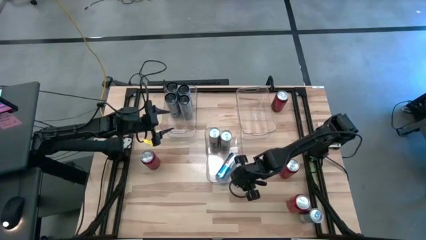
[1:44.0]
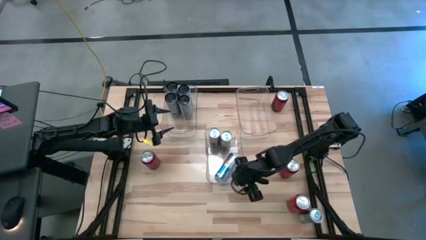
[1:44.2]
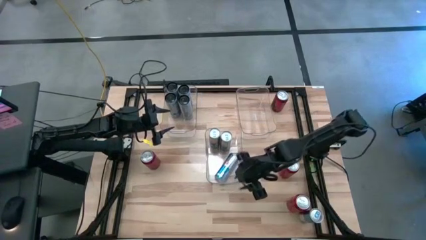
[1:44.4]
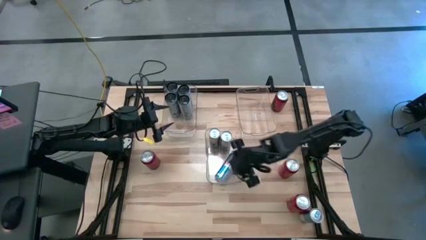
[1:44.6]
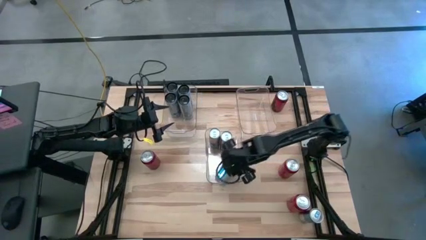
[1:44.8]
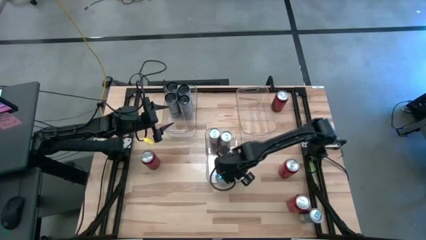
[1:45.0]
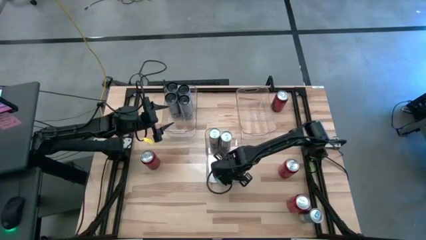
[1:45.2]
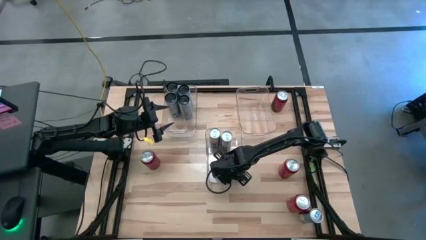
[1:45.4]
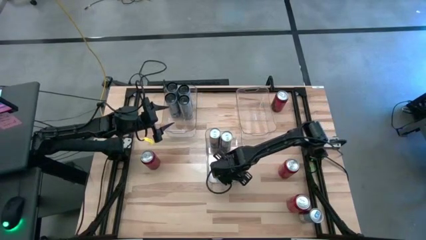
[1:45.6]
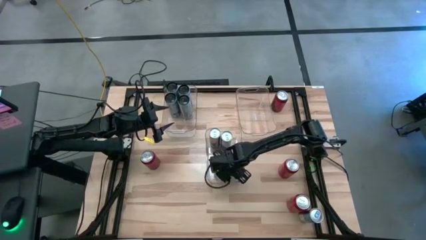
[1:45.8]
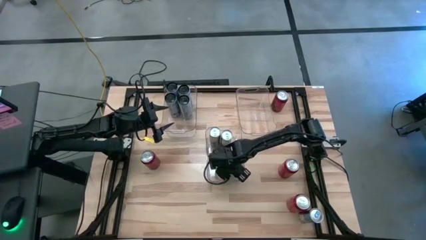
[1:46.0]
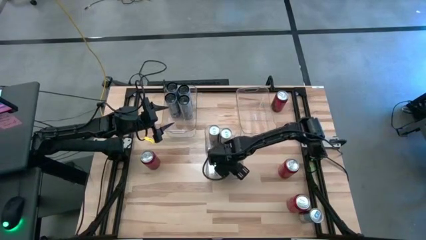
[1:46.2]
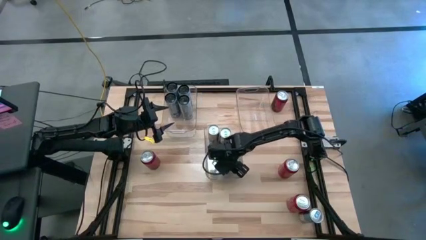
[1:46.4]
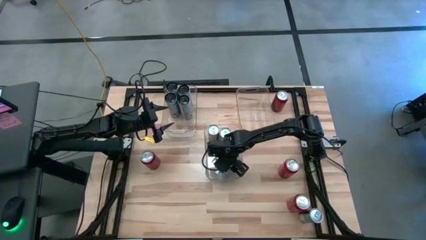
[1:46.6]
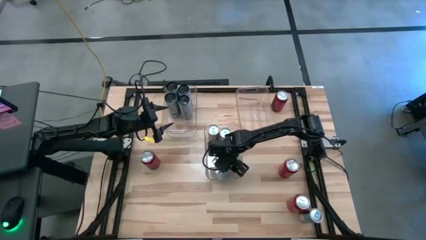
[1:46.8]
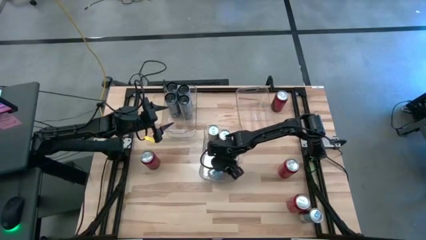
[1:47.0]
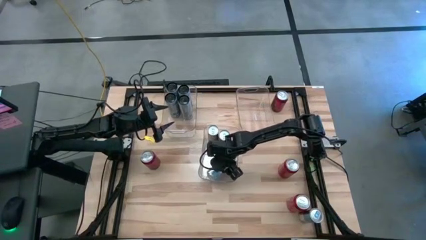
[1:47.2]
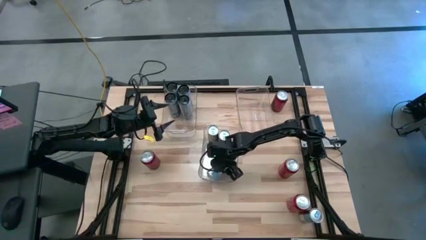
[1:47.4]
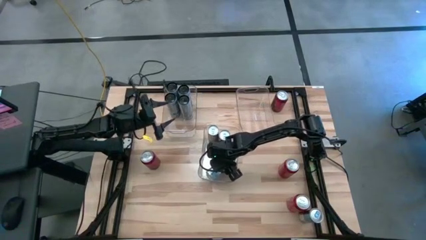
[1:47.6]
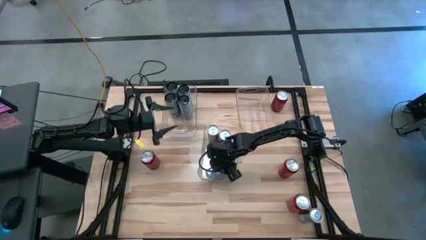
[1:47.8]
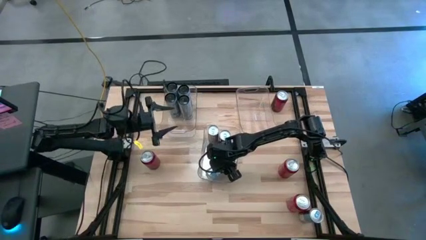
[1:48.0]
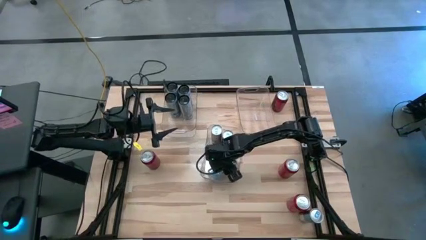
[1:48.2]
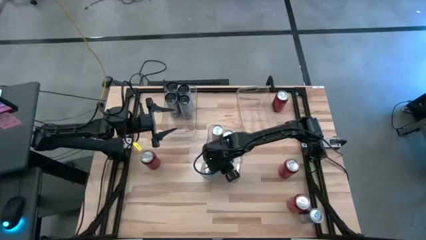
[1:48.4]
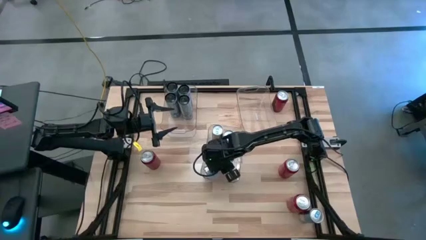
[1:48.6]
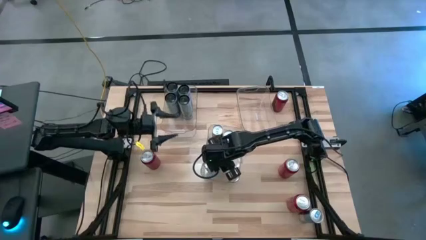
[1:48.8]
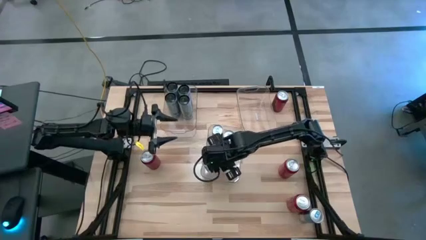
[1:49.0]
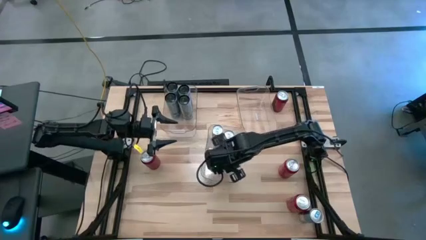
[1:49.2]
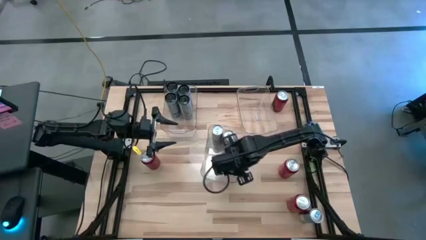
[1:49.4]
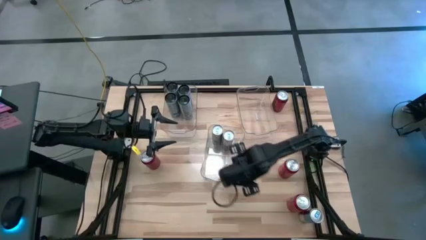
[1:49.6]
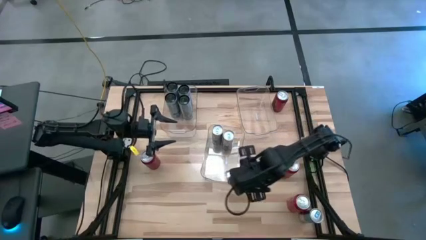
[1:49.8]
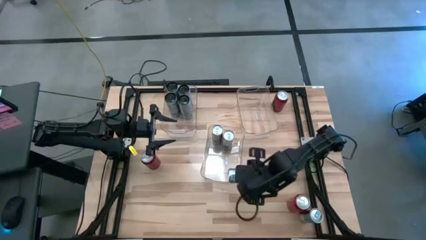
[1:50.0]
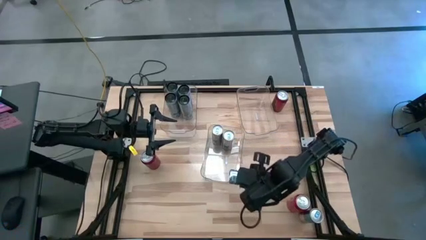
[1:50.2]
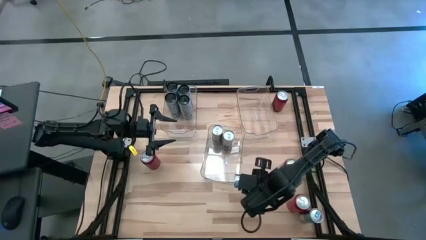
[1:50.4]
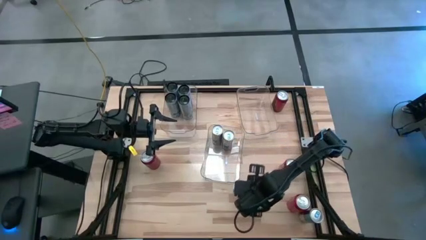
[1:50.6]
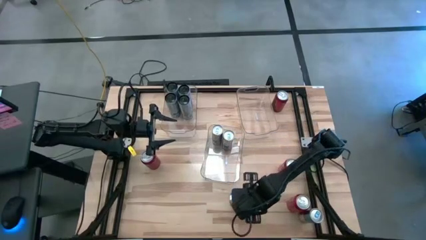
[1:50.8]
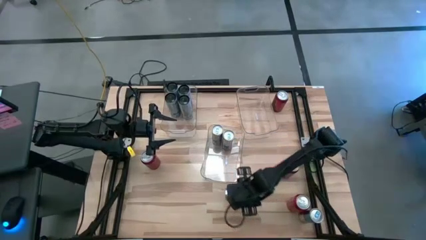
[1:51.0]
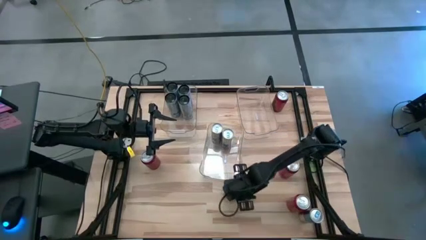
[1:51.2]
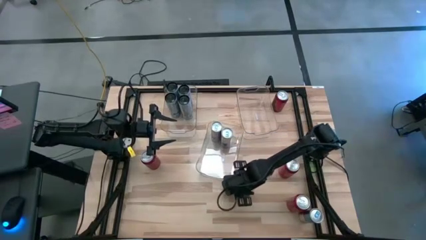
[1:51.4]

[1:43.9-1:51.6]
Task: Sort soda cans
Remove the blue soda can from the middle transparent bin

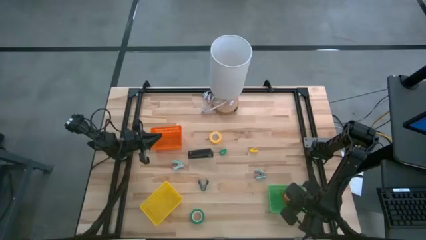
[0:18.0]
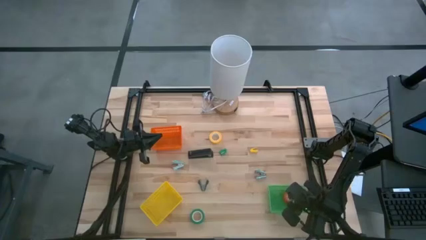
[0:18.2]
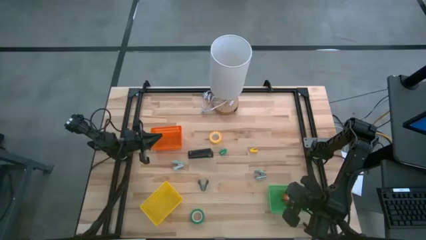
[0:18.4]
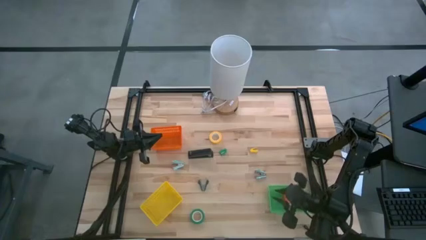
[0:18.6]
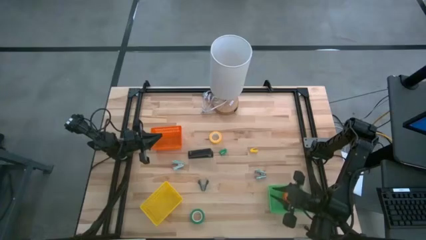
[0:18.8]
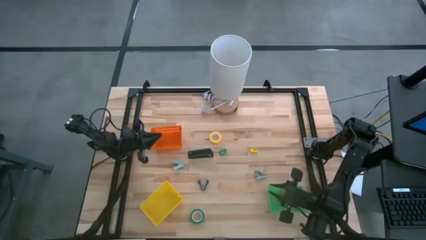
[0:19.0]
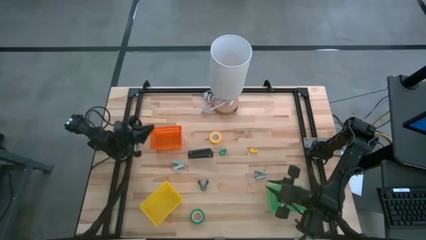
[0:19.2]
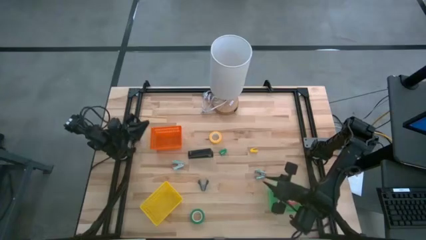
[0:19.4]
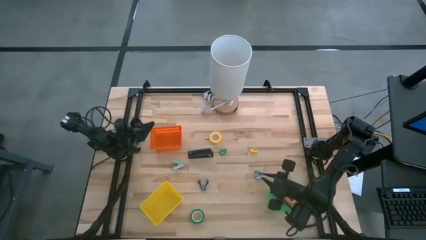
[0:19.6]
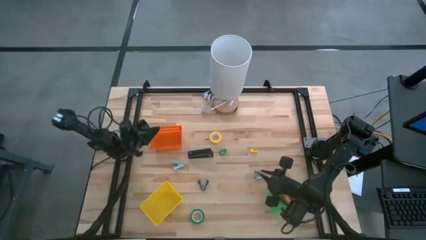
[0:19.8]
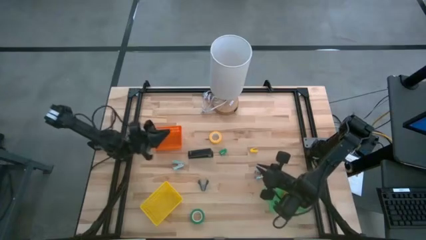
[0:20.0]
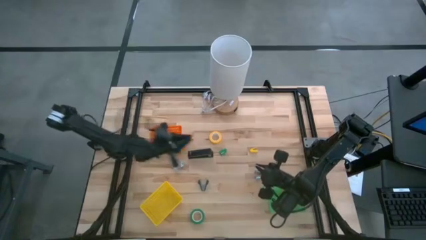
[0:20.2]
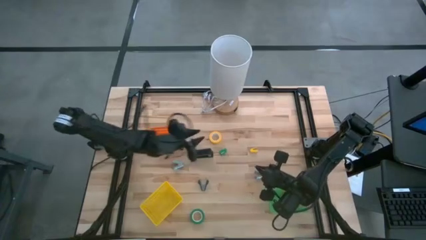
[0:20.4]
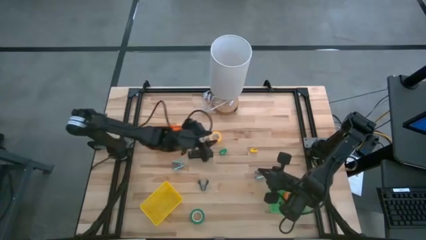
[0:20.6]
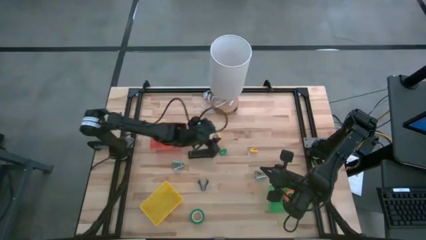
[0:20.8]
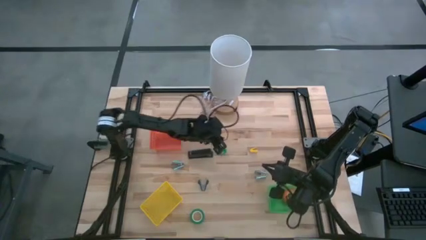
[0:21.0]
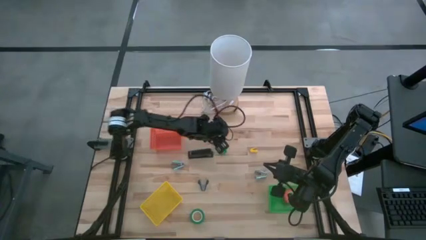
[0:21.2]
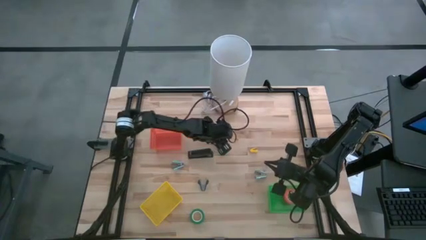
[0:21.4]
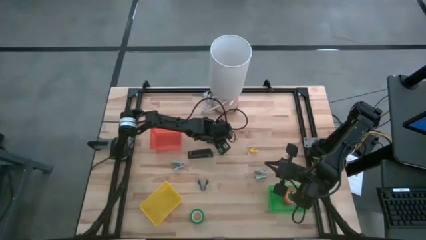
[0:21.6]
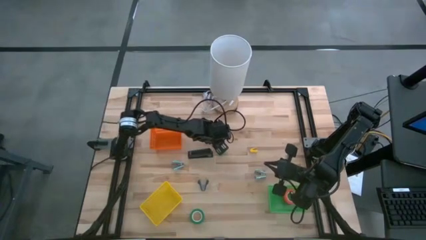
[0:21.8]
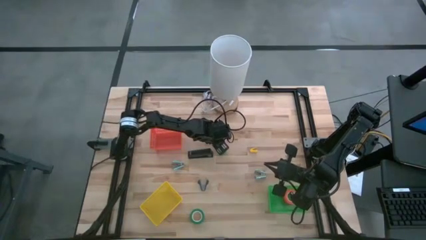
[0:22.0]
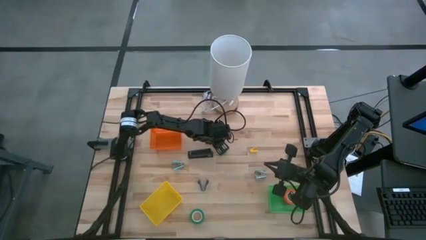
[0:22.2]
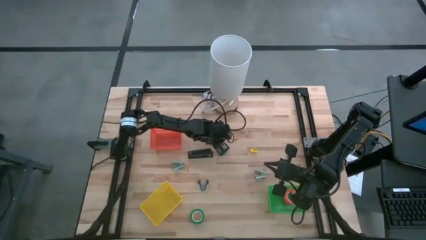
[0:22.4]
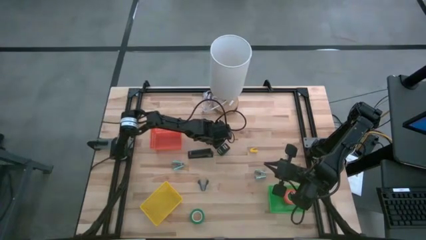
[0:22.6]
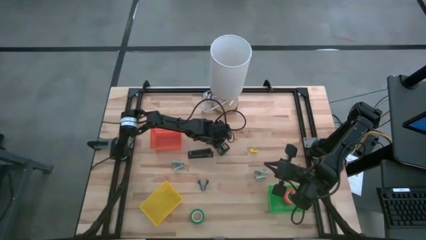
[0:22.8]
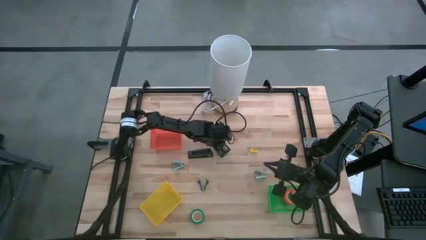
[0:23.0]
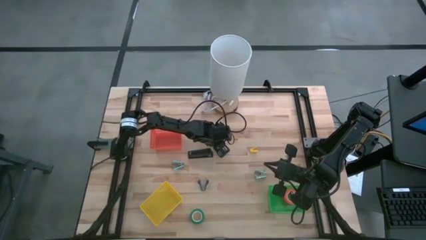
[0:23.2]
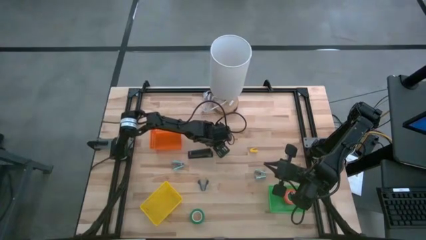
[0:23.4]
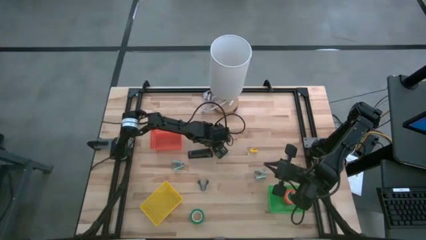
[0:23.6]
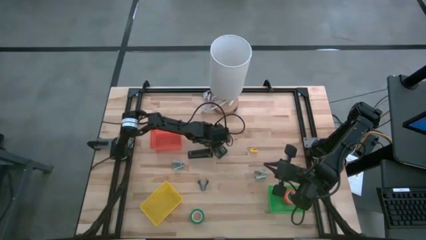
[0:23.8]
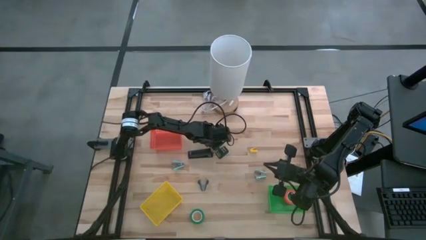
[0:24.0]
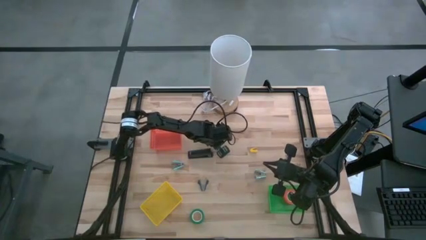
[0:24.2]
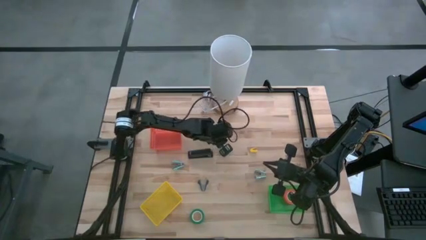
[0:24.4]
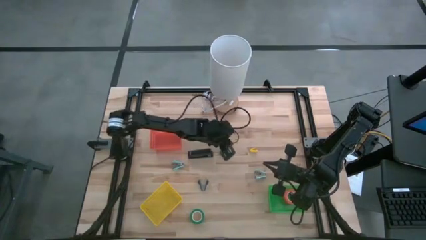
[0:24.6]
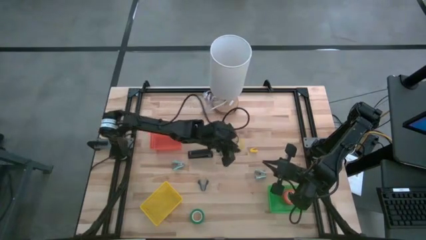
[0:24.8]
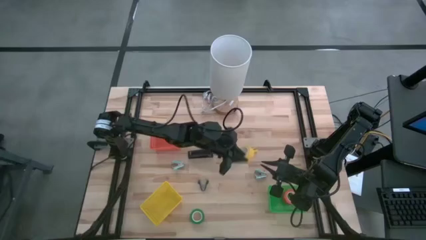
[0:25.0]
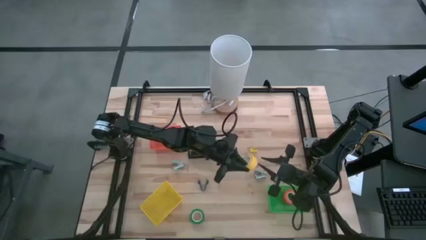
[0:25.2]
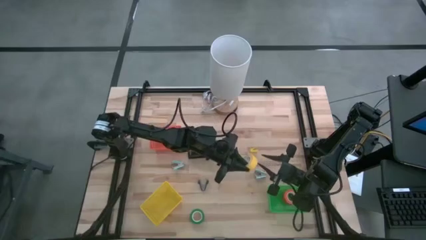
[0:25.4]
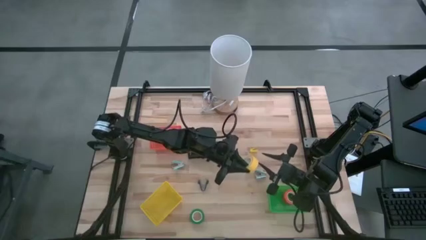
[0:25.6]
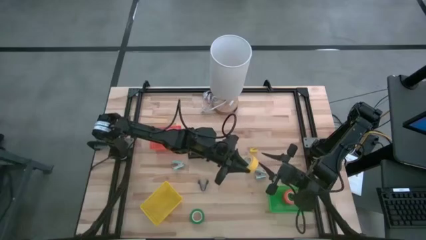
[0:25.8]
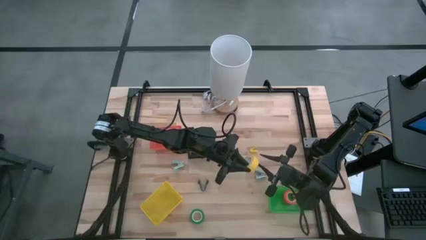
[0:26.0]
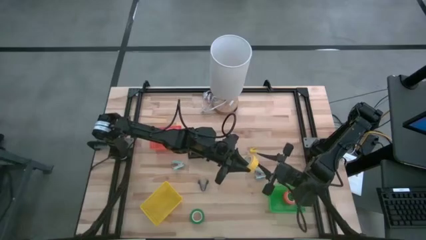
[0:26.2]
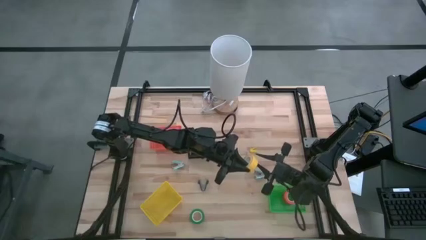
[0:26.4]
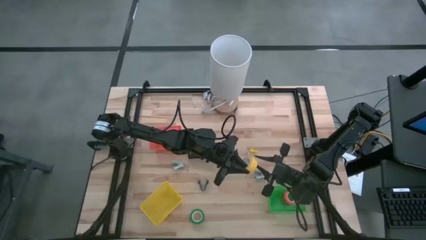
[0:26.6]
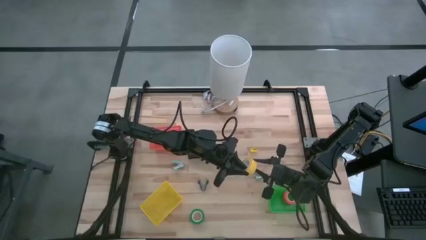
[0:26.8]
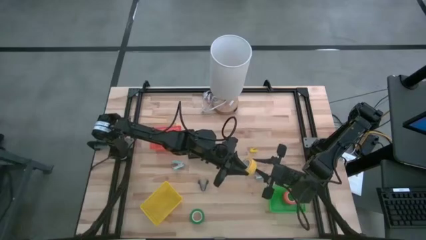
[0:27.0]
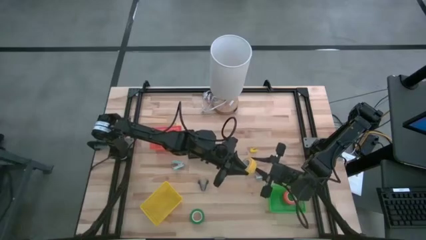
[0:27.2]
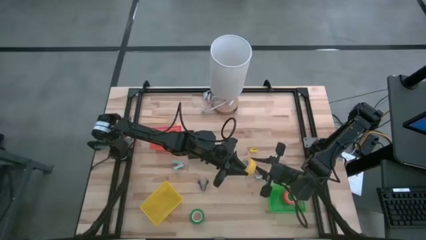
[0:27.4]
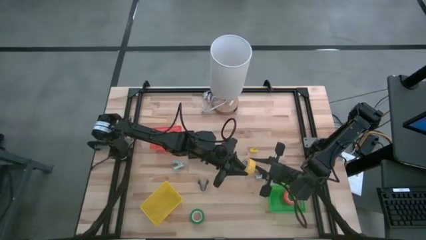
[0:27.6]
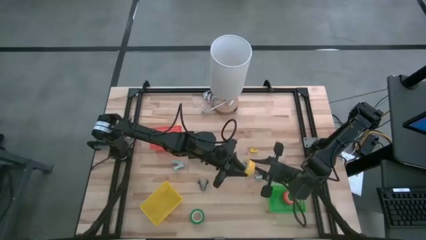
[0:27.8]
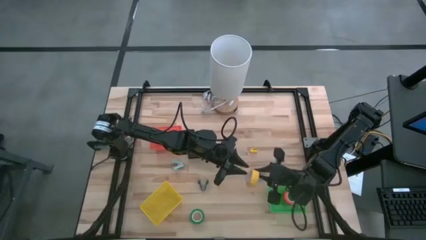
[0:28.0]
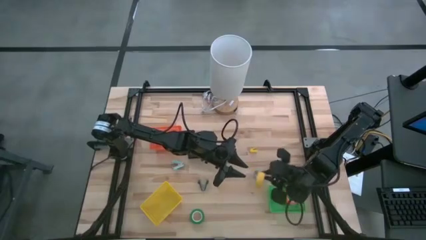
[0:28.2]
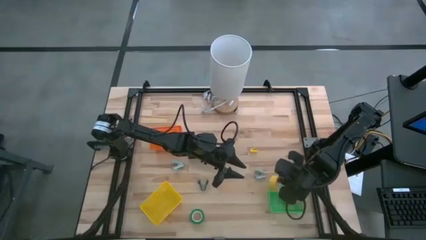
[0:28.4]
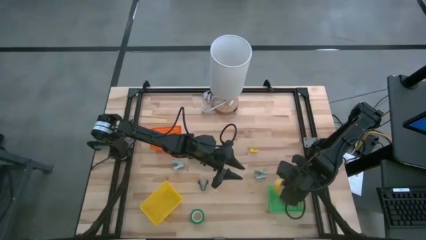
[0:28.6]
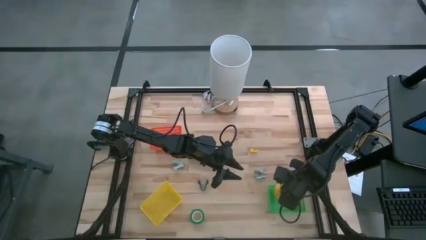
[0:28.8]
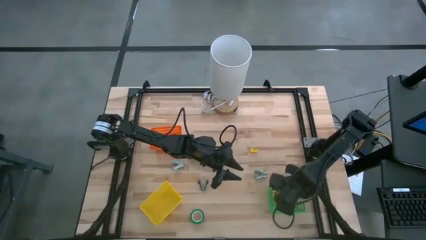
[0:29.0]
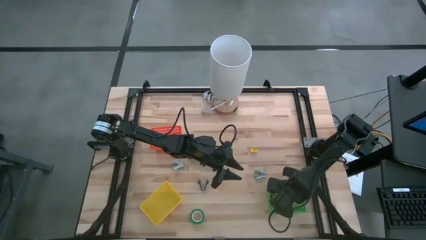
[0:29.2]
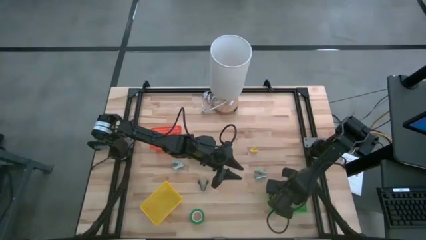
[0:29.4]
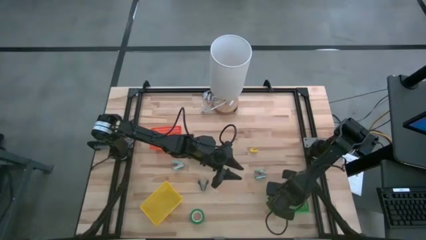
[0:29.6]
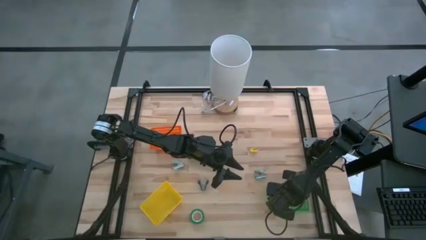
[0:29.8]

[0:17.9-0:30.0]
Task: Pick and place Stapler, Stapler remover, tape
Put the yellow tape into the green bin
